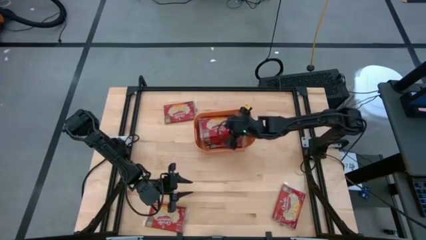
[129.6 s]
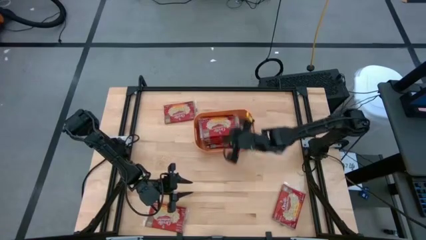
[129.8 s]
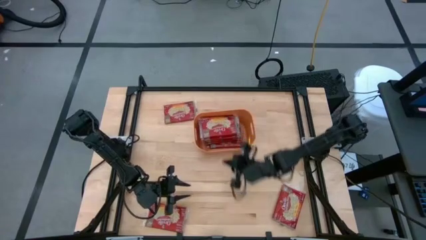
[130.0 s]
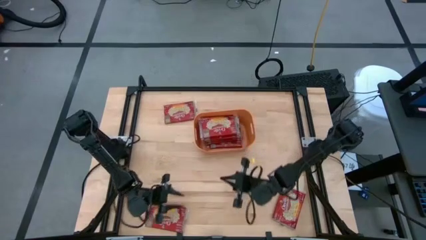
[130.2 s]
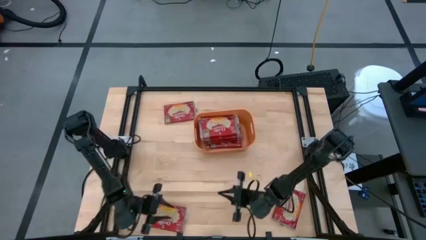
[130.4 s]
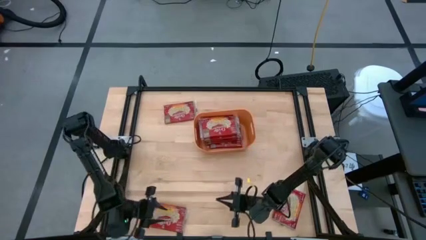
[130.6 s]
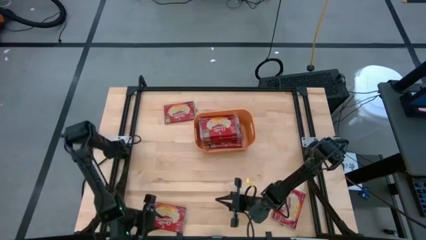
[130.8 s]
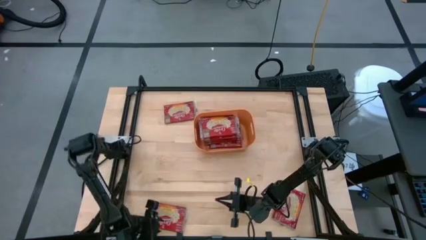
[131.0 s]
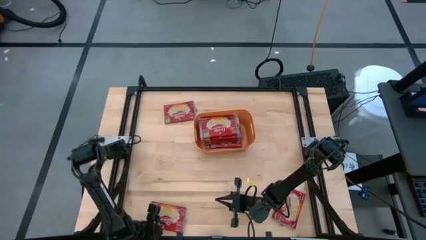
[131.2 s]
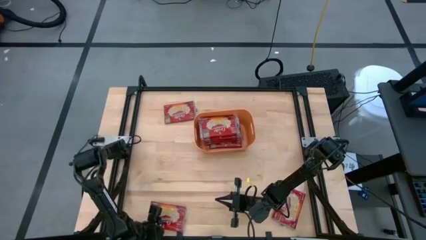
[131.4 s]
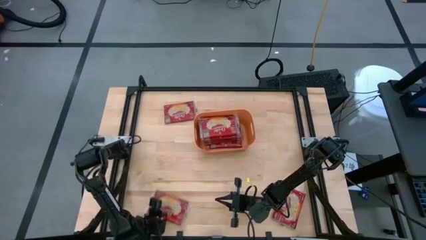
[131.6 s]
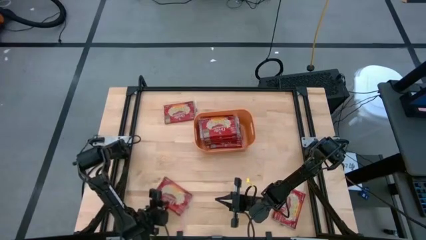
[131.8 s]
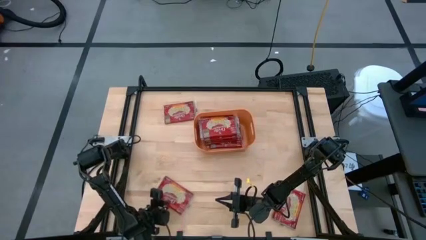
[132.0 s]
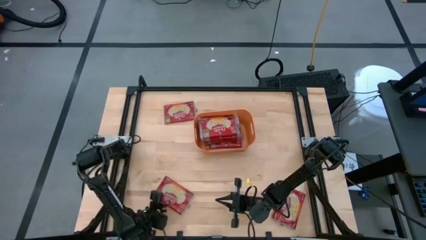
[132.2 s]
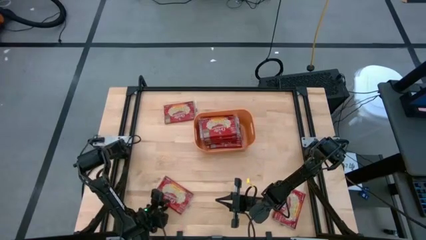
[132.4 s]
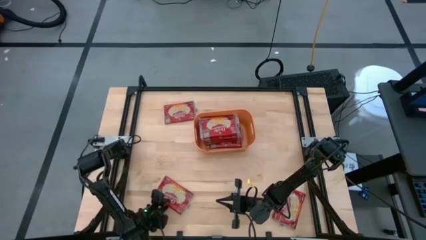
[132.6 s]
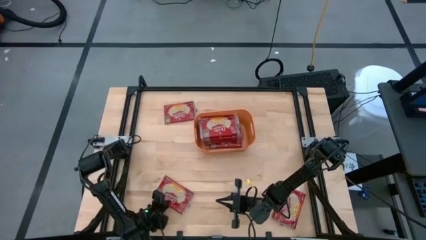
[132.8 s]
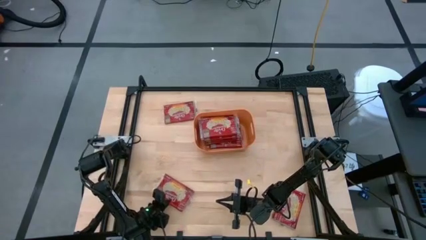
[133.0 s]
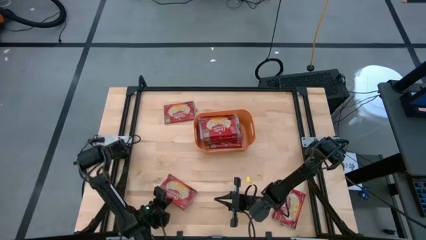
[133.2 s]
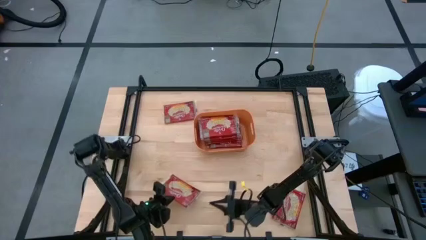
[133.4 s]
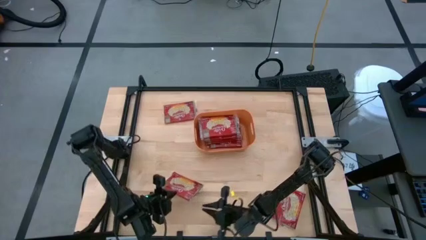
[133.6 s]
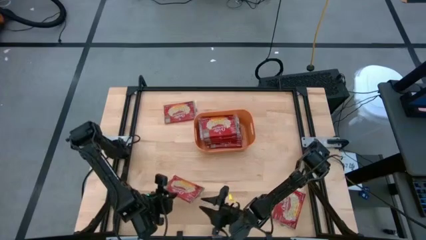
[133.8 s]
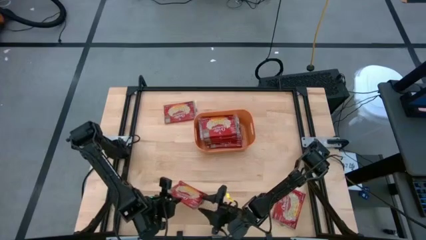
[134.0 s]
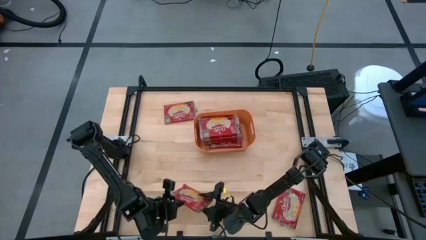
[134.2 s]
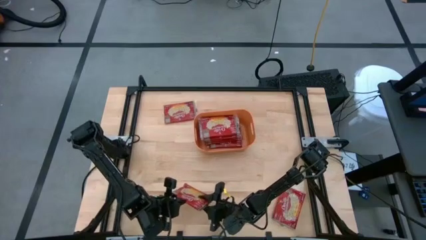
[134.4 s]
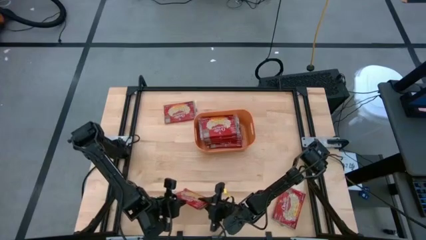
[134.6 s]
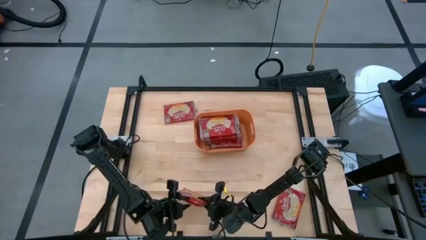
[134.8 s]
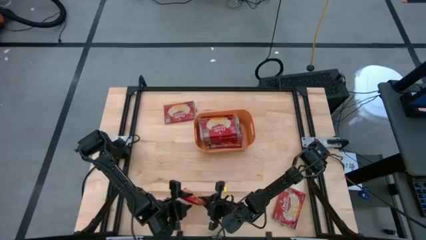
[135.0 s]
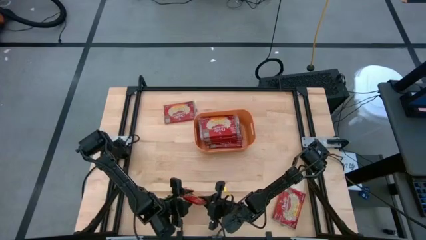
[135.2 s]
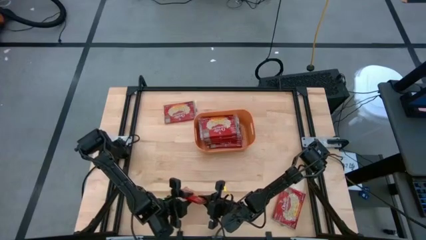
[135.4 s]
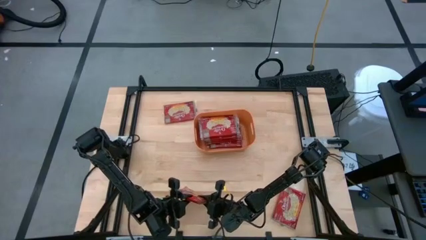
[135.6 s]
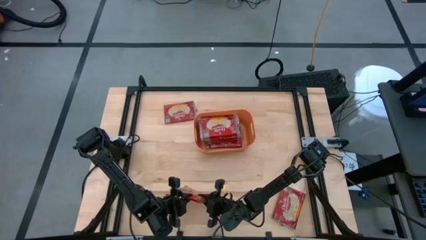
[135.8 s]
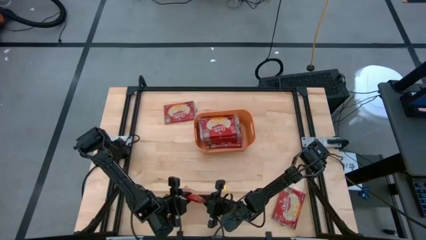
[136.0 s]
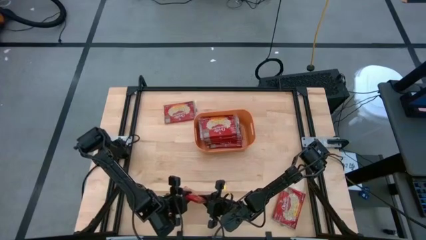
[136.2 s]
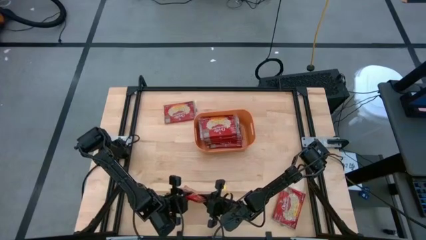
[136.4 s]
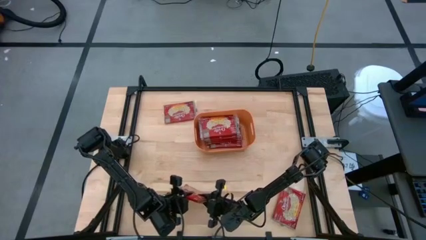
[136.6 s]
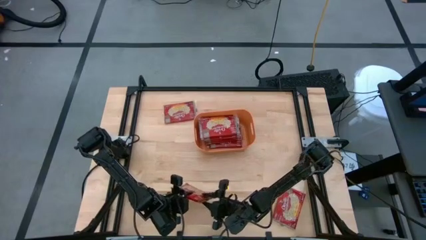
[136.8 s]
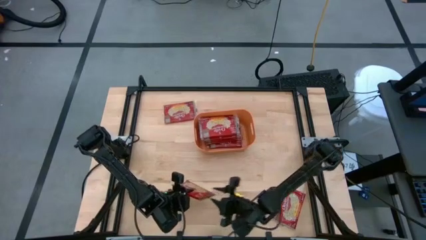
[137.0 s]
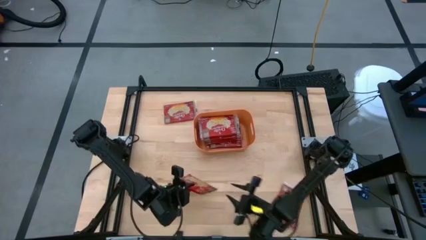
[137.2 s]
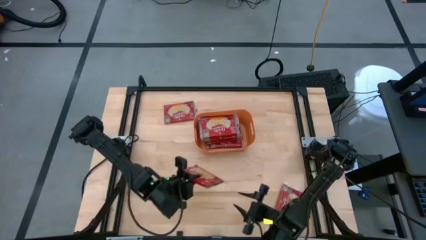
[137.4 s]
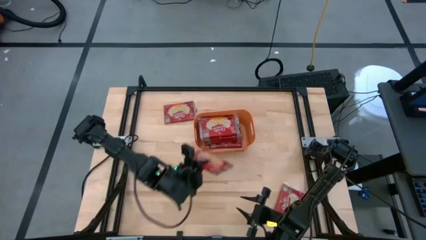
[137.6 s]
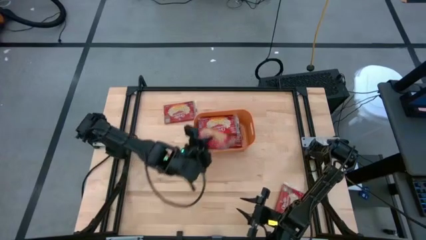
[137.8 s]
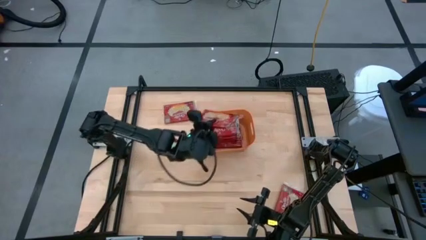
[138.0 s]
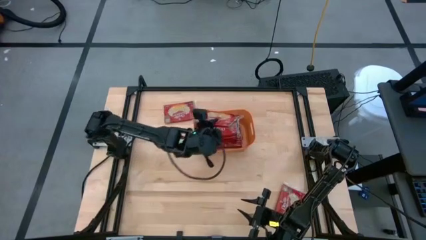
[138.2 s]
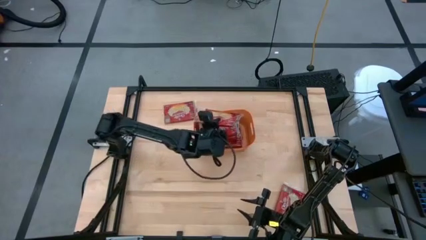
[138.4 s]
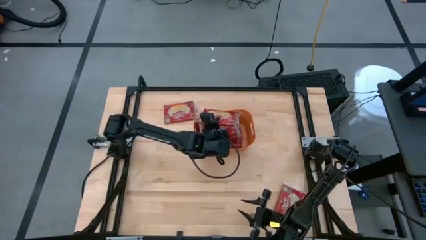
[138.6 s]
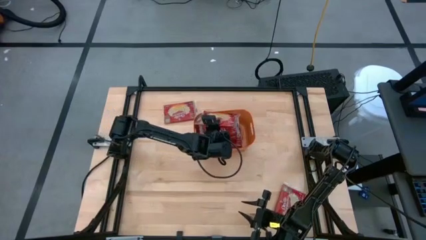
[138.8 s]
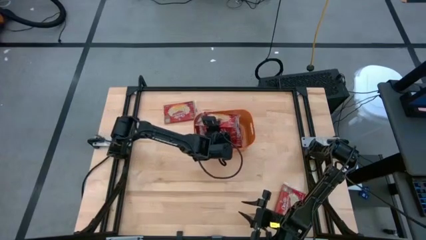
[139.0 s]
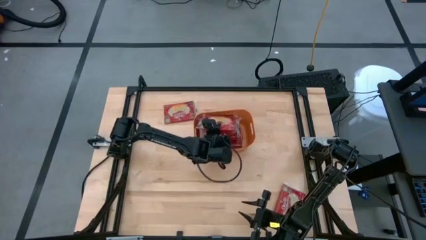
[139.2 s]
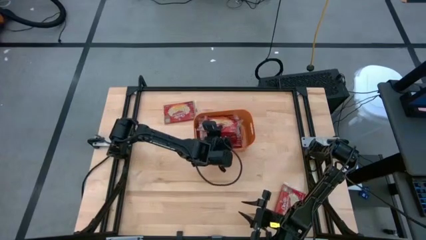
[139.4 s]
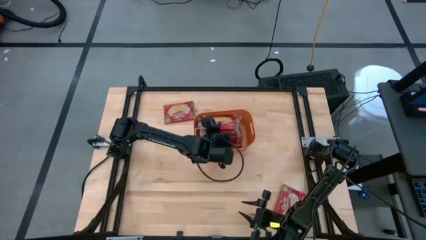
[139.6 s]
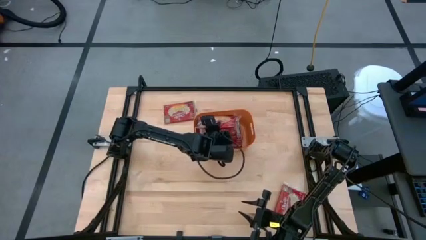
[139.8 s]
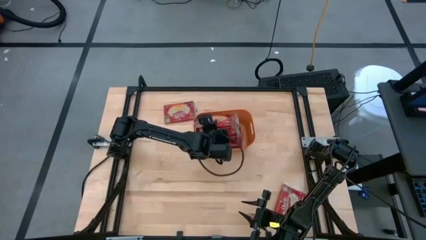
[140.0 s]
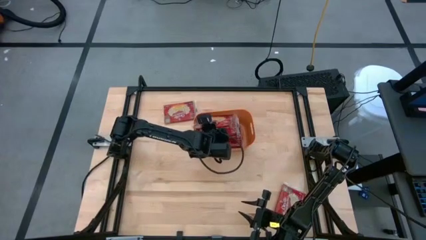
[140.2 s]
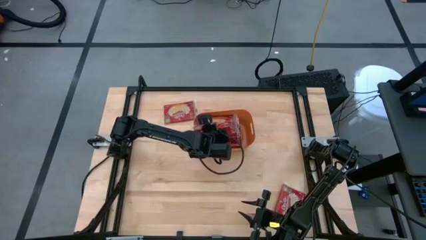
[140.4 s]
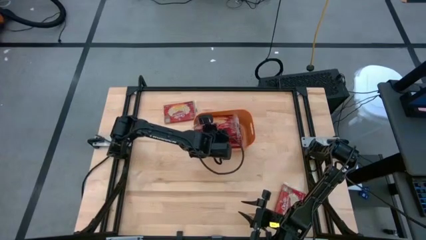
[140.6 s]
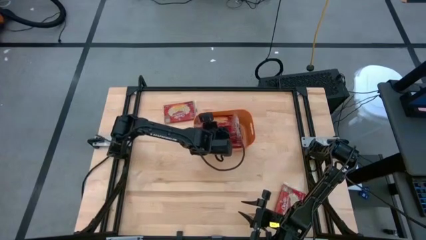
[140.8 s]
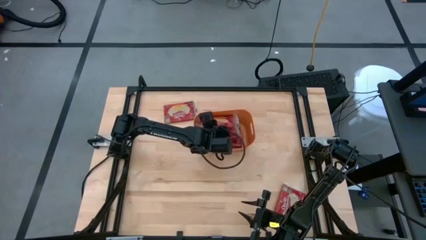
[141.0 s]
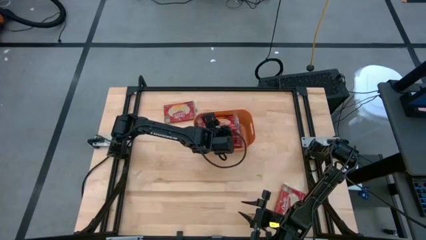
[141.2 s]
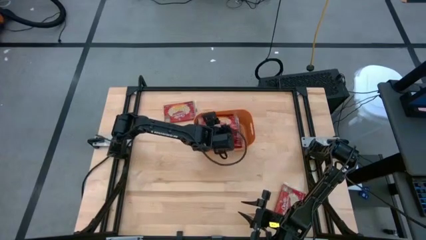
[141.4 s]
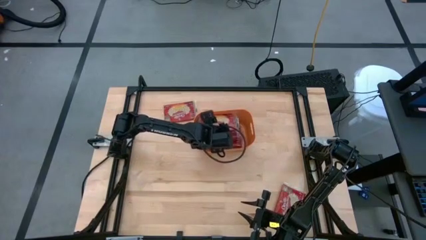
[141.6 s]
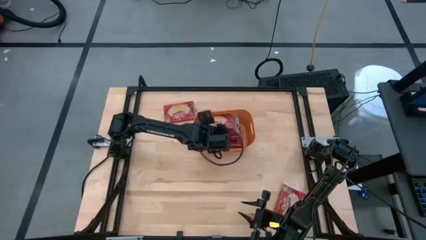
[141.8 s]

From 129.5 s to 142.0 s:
Task: Sort popcorn bags into baskets
Put the red popcorn bag into the orange bin
